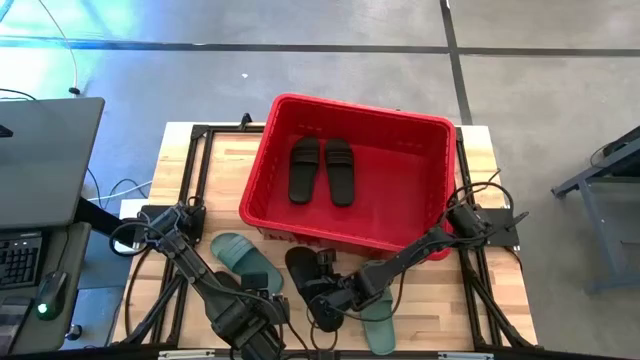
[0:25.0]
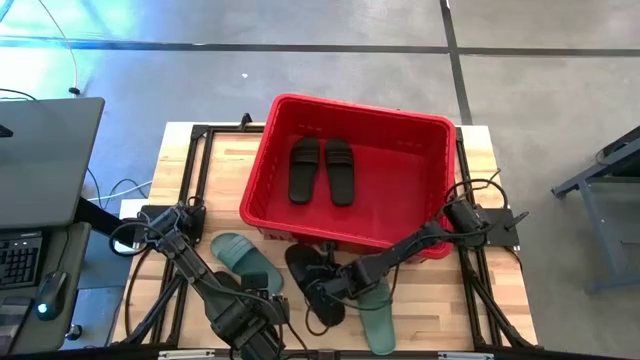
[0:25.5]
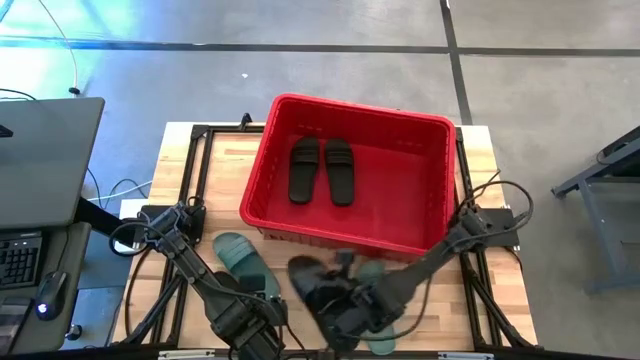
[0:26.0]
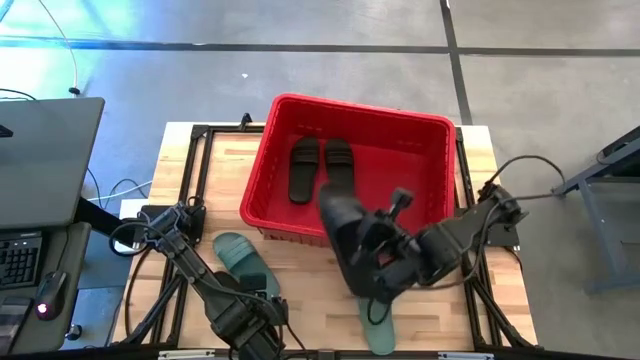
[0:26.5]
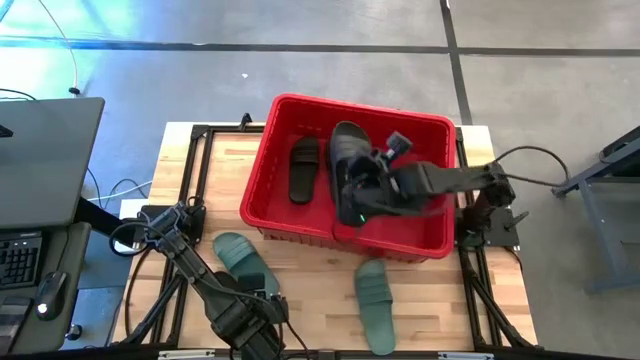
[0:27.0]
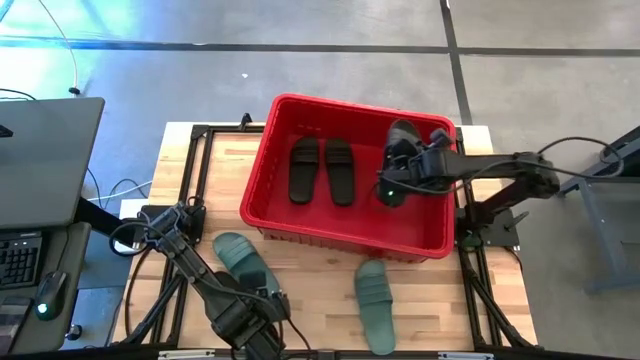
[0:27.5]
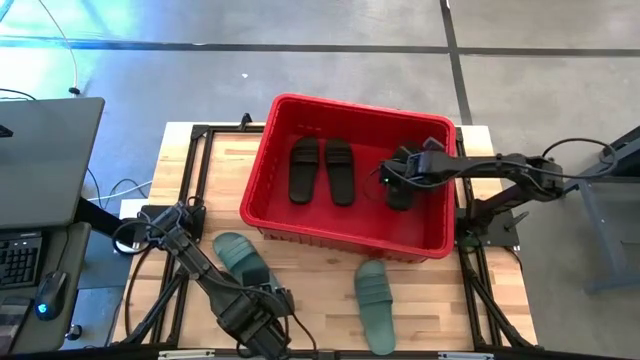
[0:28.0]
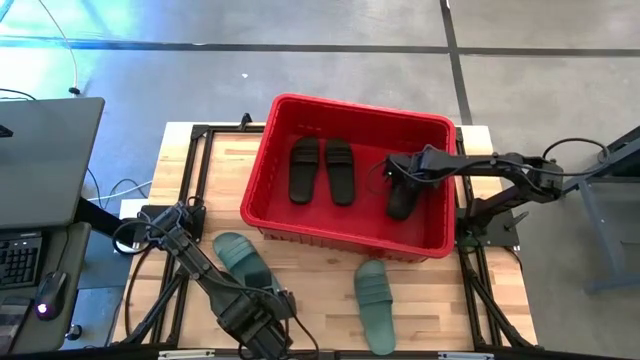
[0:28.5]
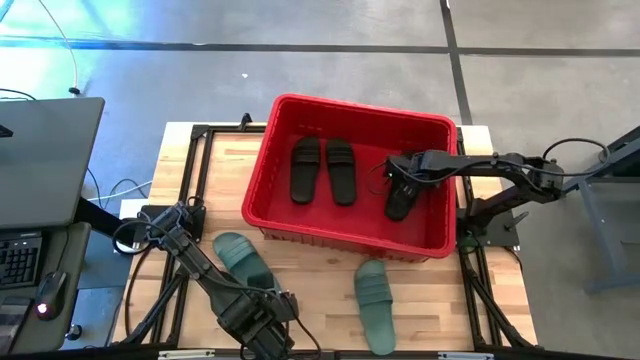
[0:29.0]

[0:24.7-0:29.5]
Task: Pick and place slides into bin
Put the black slide into the red bin

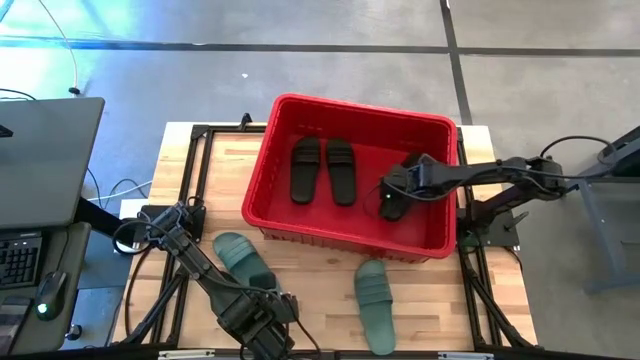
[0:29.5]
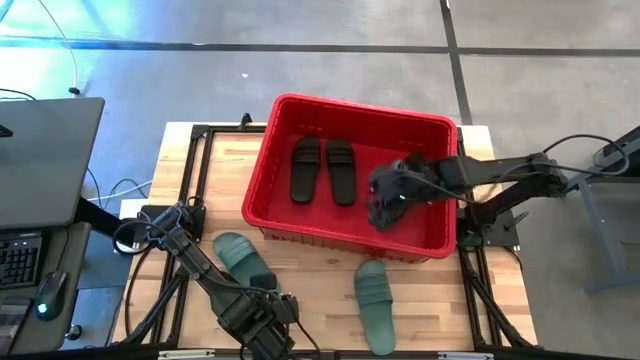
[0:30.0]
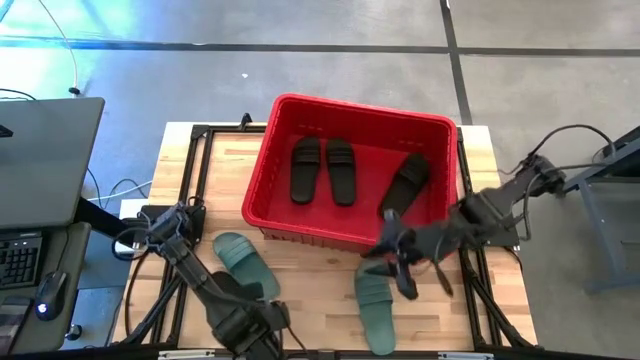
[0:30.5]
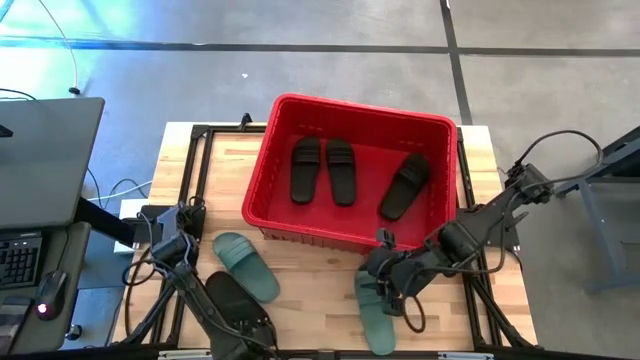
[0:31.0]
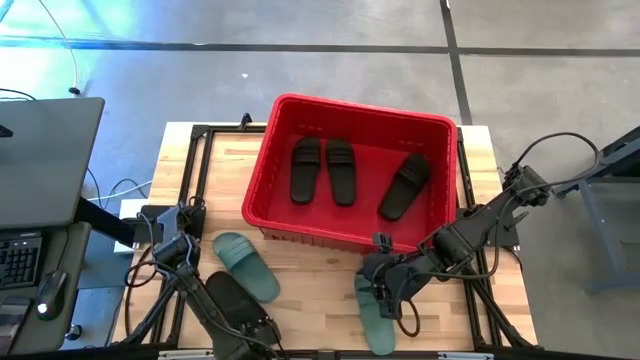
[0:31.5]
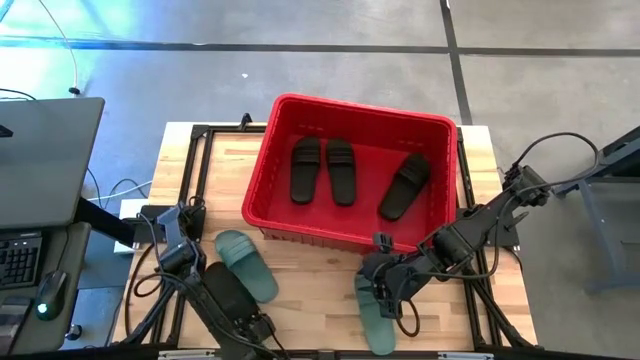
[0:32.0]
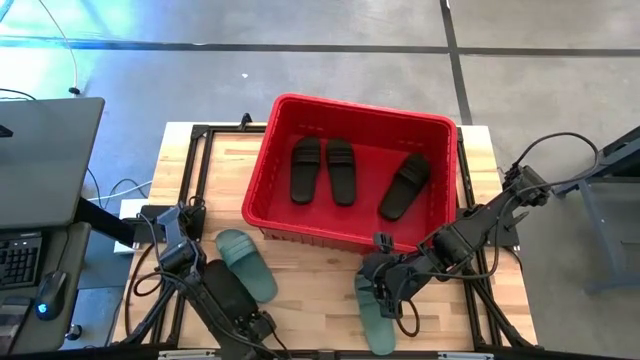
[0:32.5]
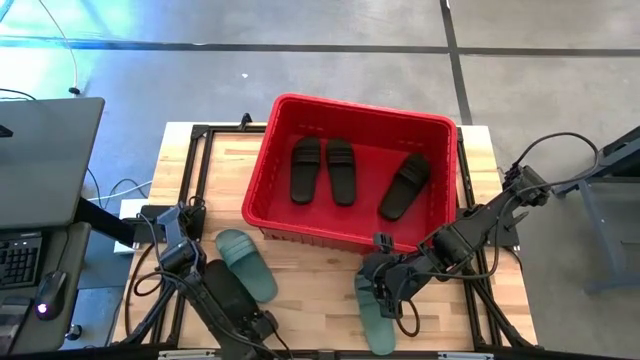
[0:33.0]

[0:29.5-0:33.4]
Put the black slide into the red bin

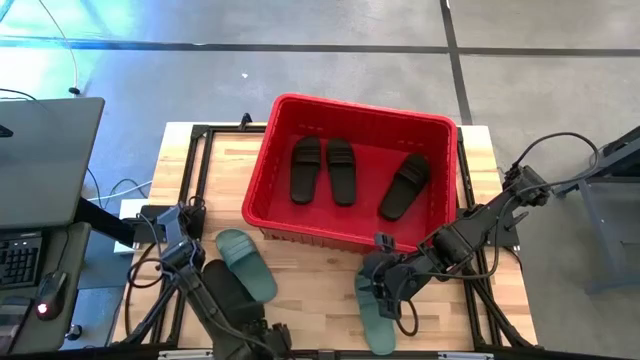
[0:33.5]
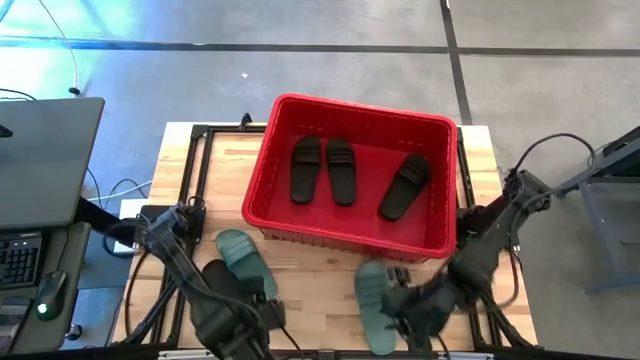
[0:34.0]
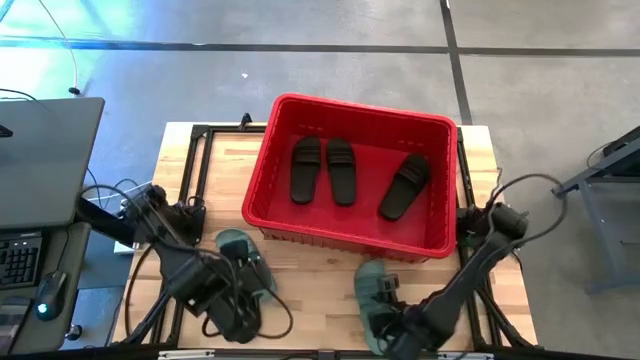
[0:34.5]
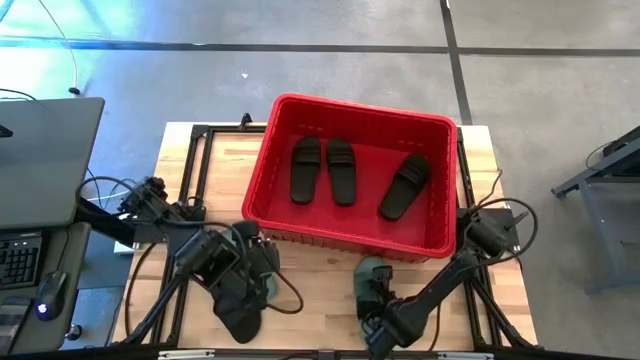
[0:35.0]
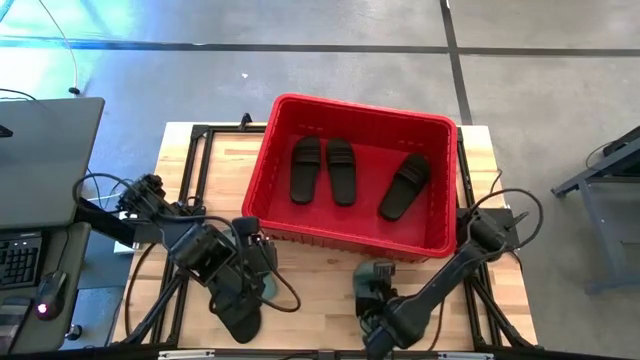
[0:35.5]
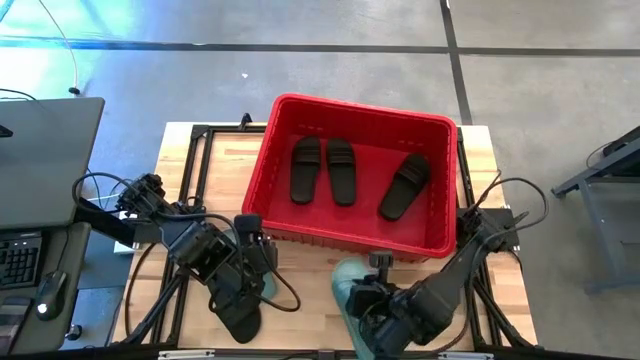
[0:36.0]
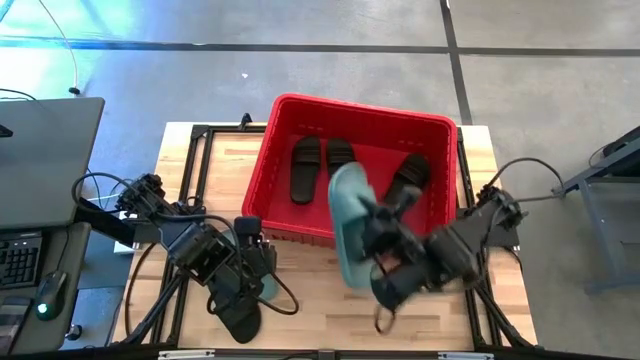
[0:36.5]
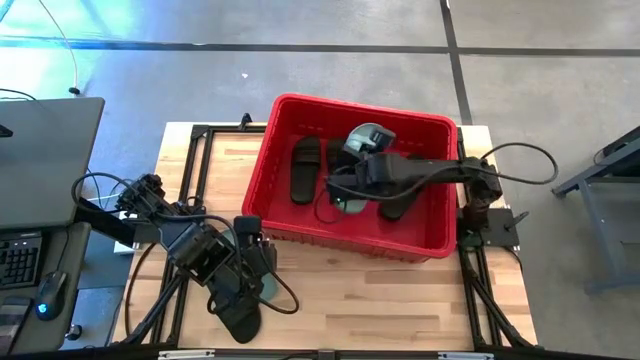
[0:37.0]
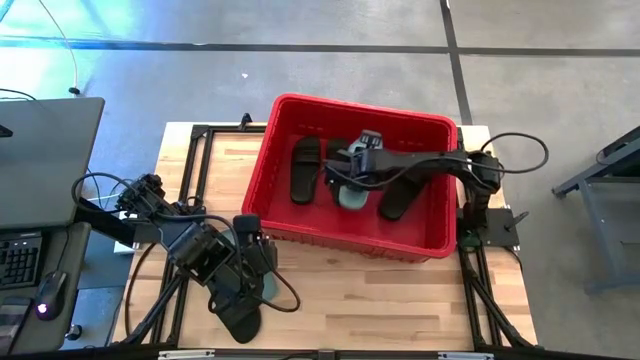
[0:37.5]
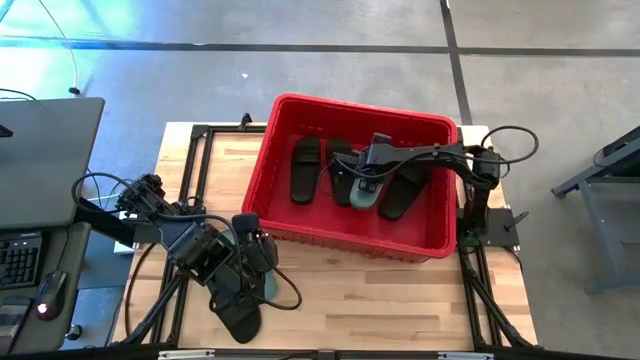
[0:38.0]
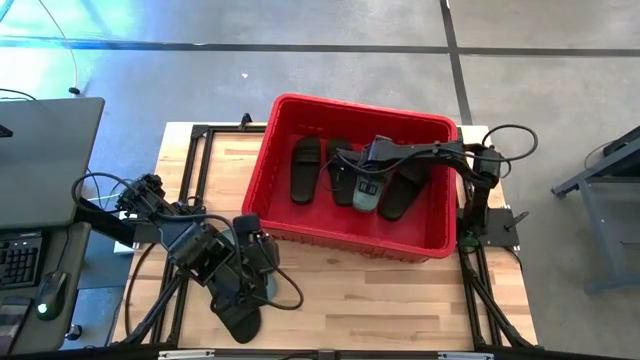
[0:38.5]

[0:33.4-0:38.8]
Put the green slide into the red bin

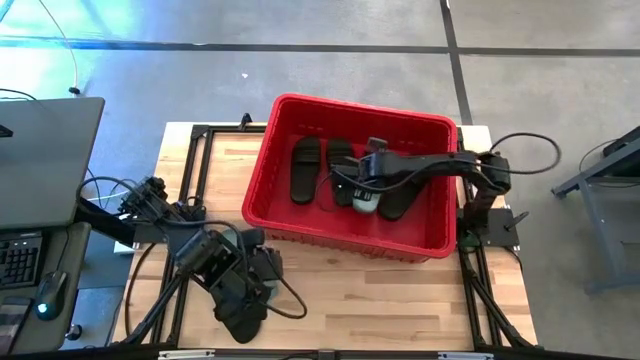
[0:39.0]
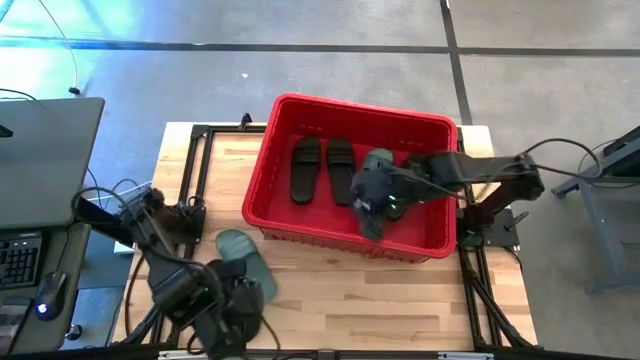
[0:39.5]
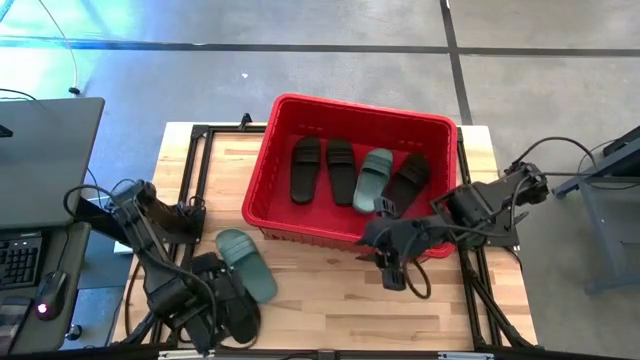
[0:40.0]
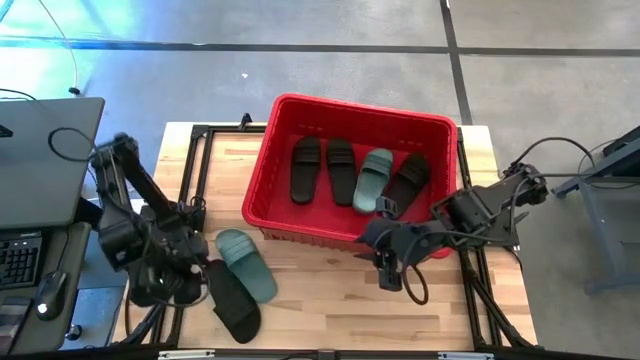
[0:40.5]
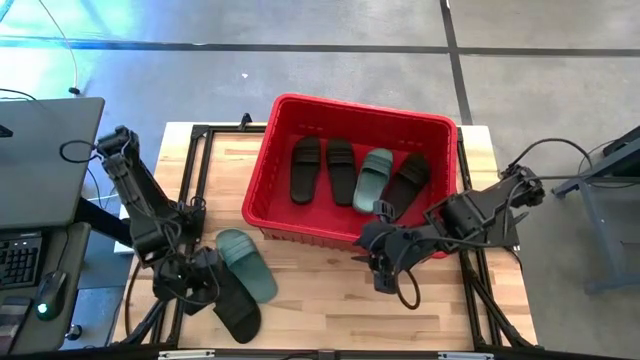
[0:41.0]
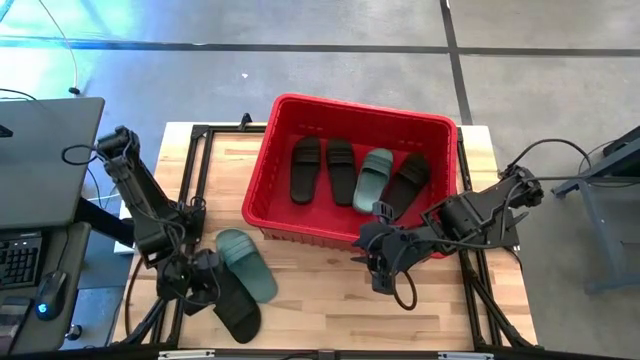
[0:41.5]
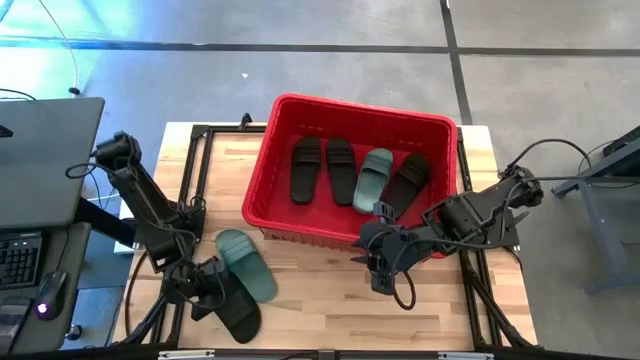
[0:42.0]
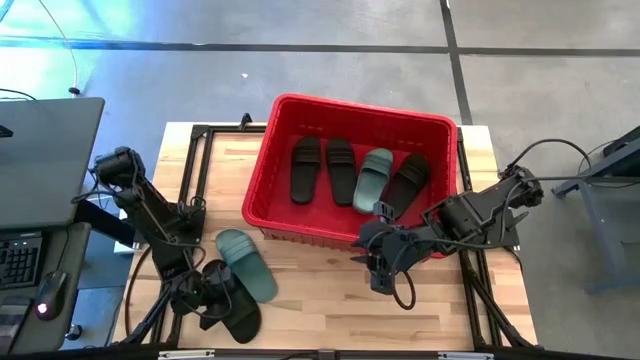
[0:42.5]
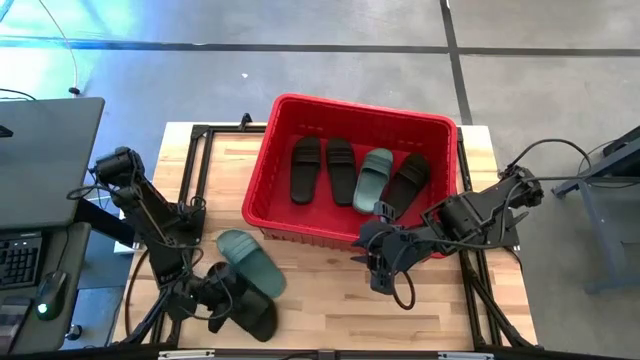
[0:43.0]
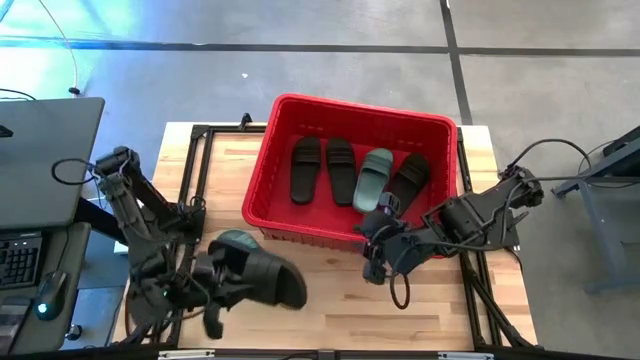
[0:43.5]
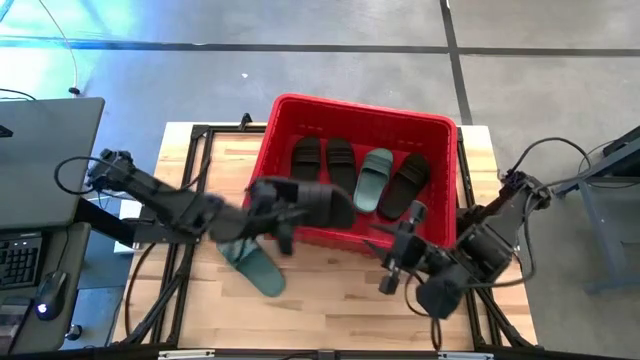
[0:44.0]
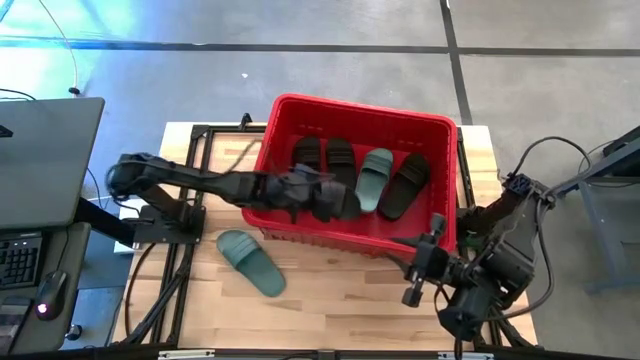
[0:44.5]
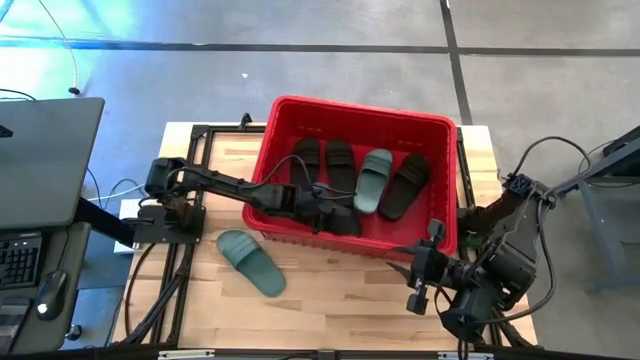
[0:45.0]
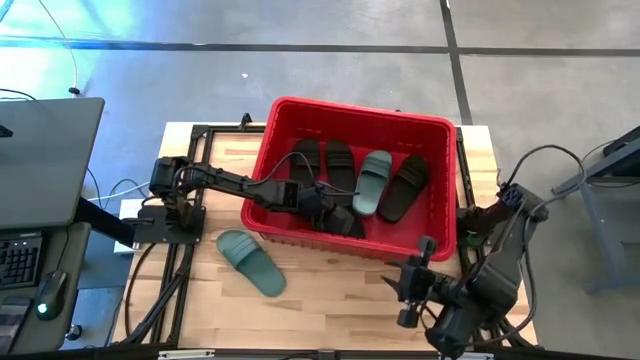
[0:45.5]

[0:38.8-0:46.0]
Put the black slide into the red bin
